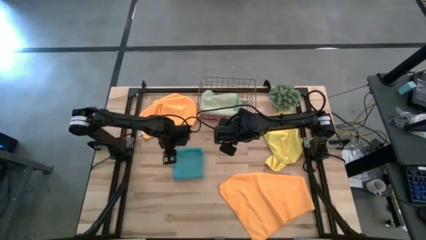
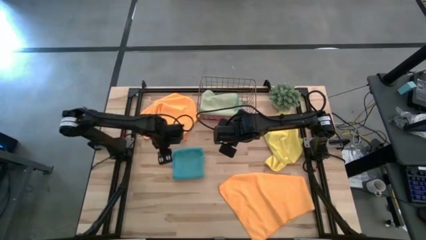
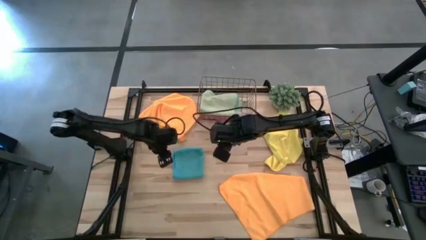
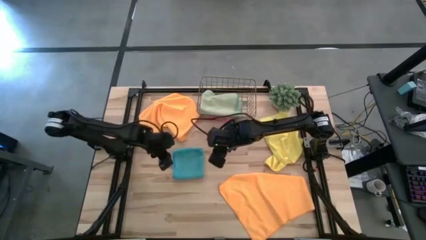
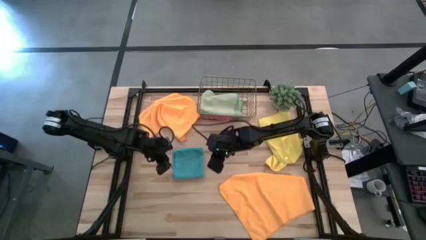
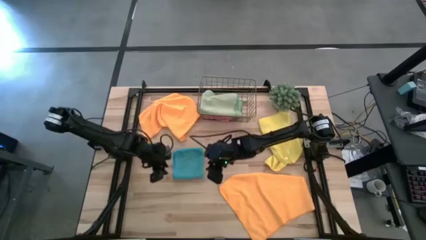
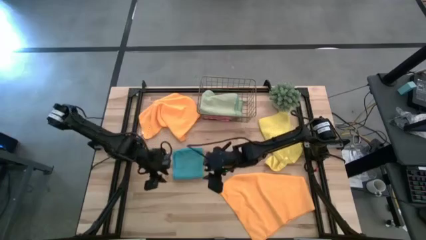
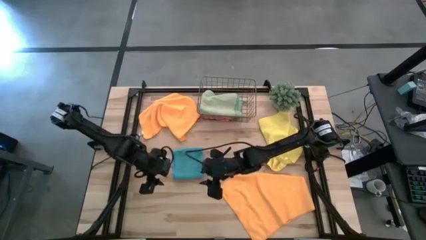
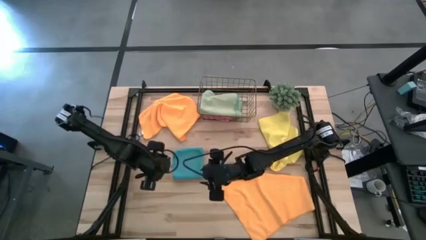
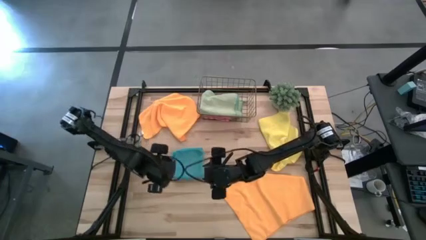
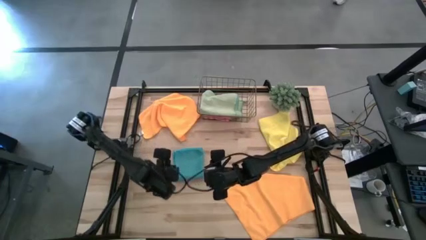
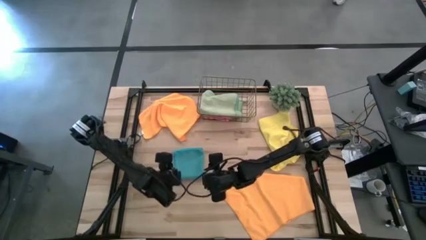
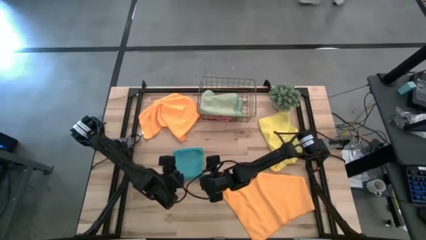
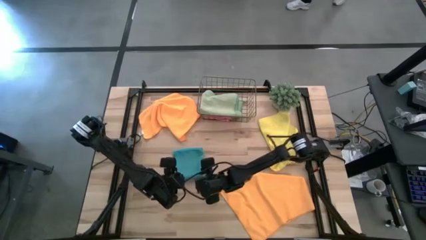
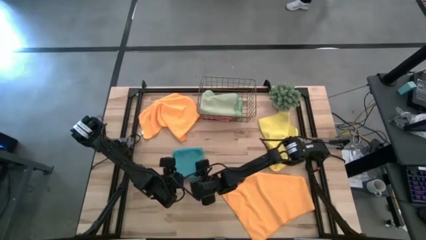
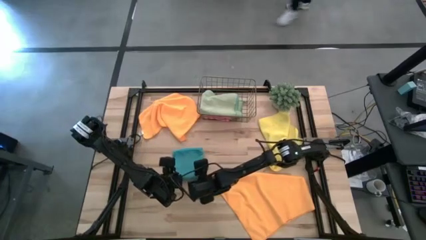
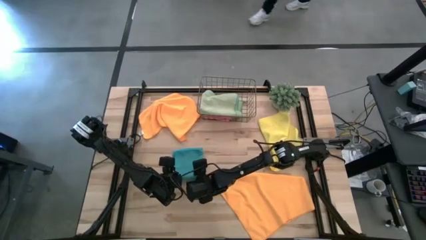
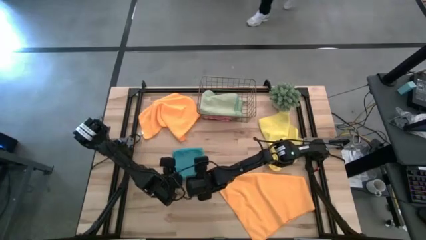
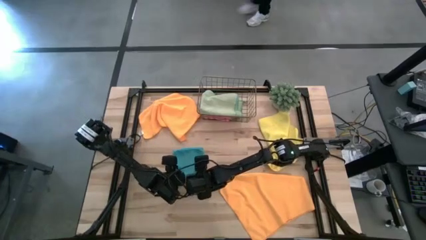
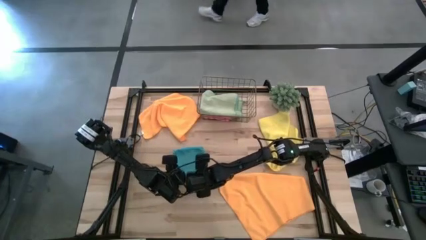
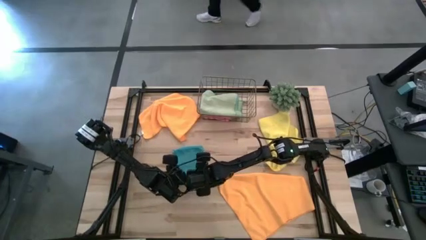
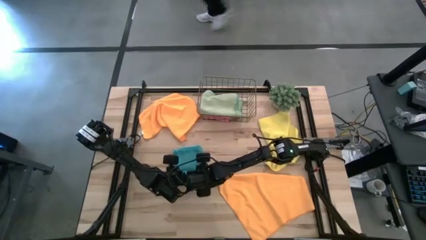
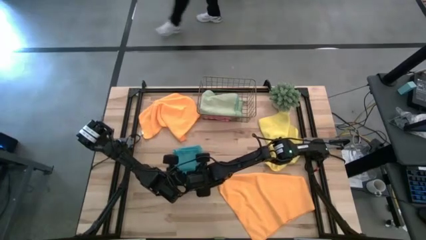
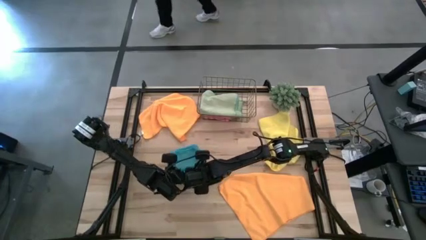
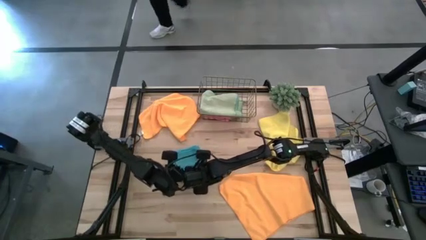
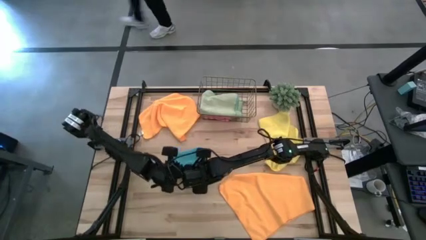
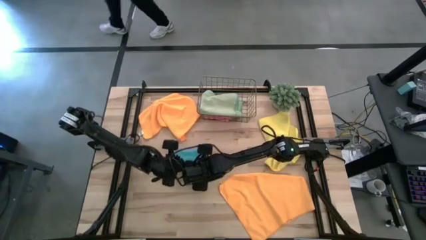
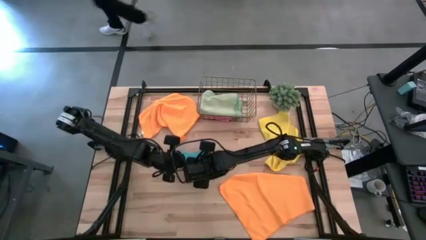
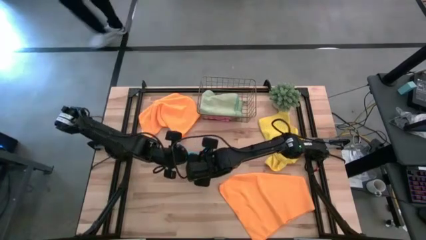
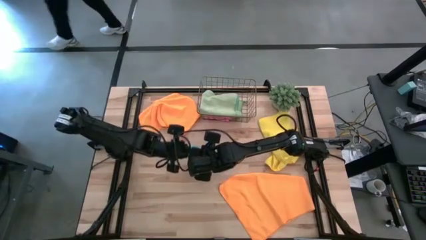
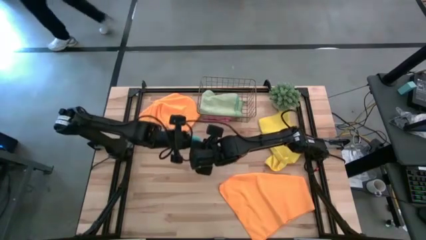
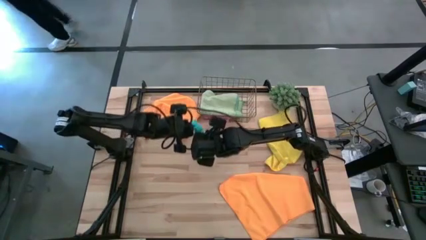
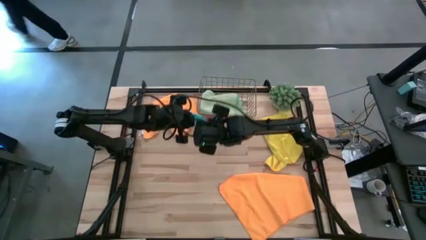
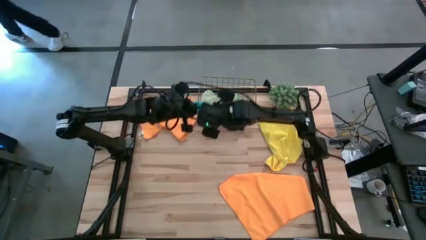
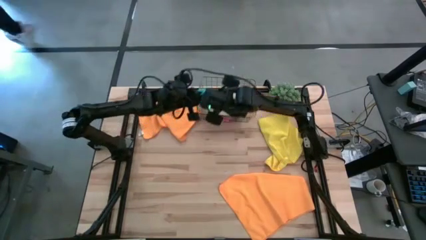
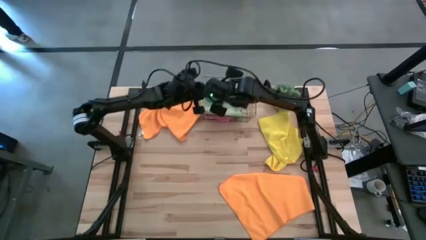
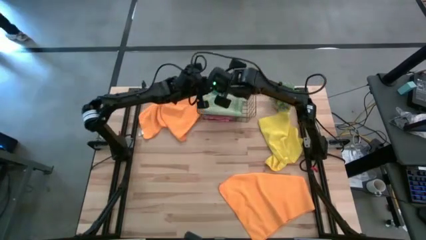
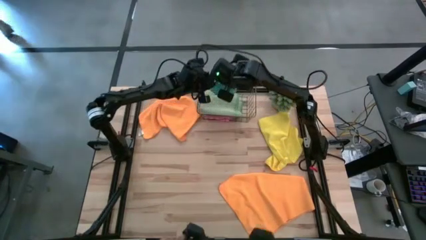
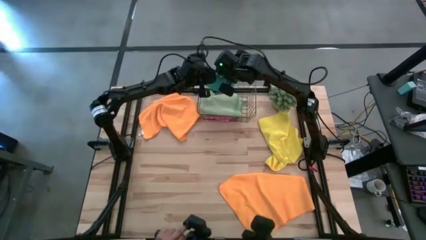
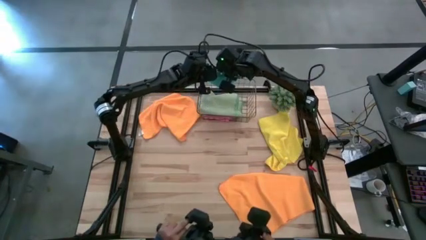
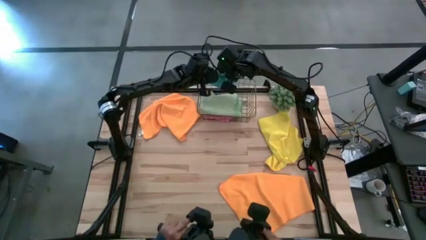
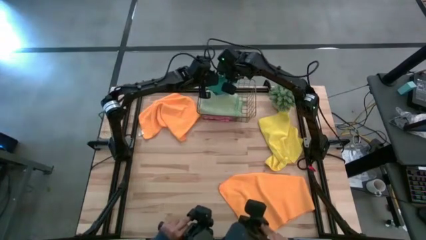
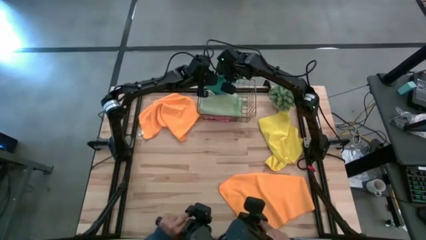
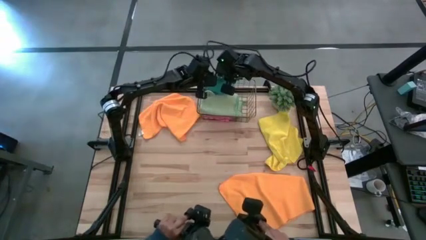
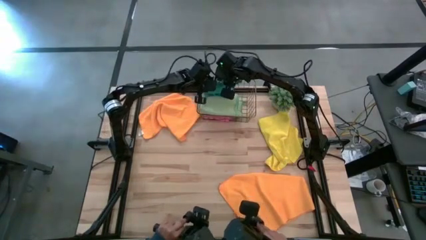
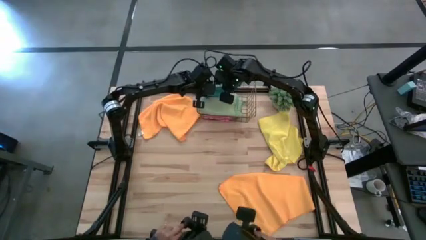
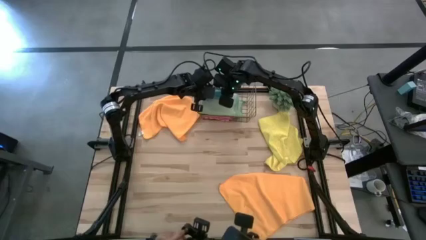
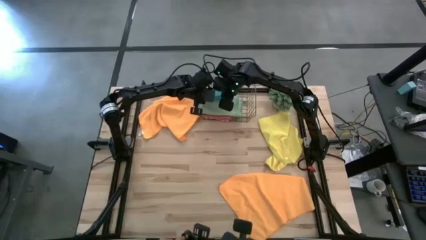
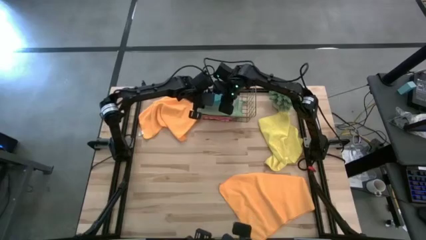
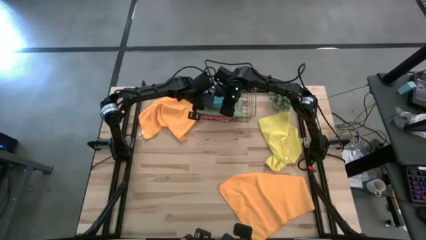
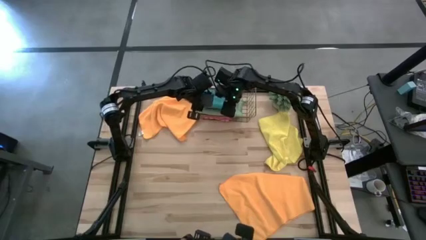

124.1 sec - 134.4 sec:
Task: Fold microfiber towels
Stack the folded blue microfiber cloth on top of the folded green microfiber cloth

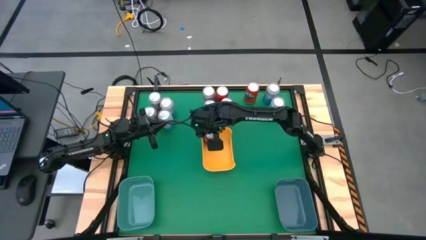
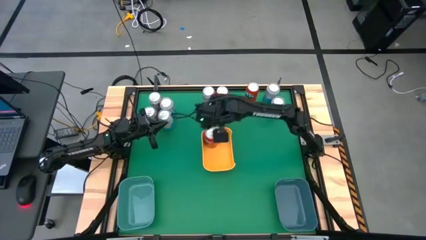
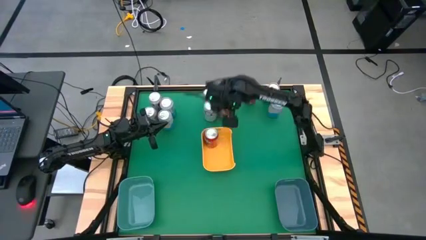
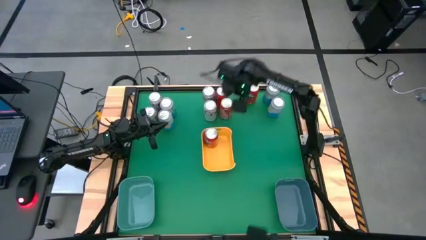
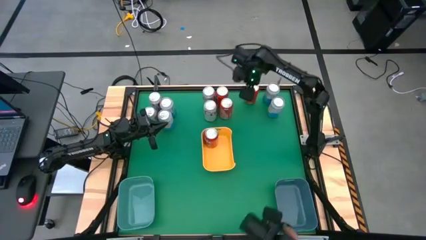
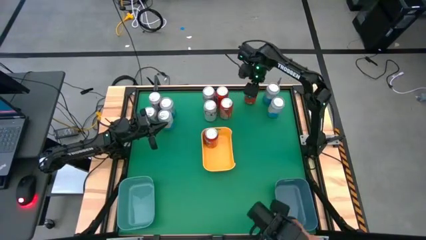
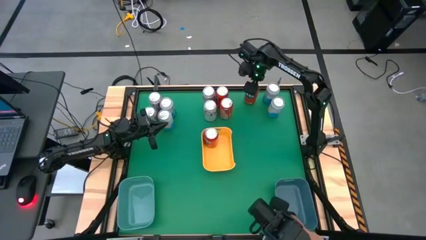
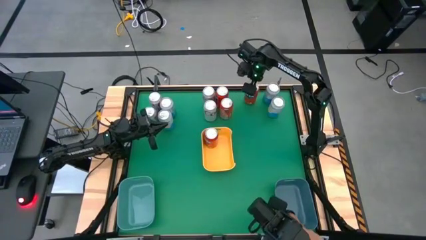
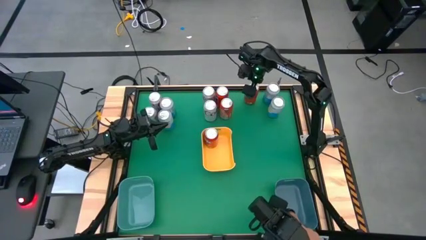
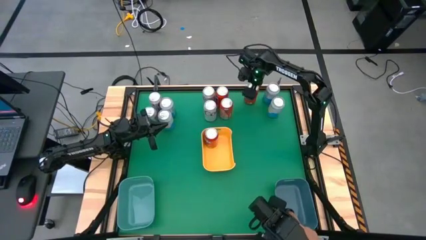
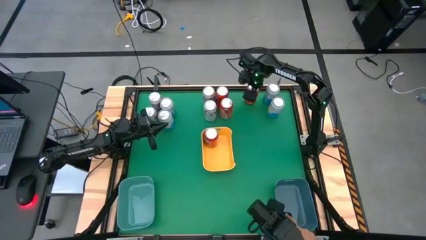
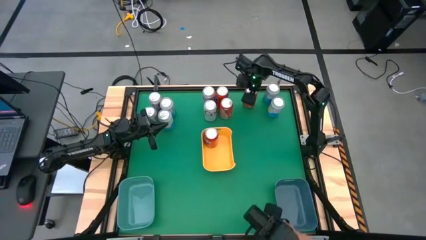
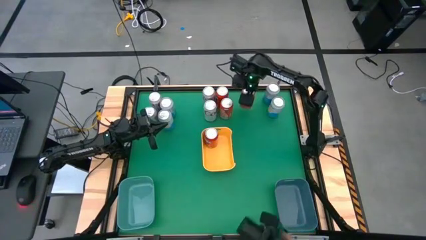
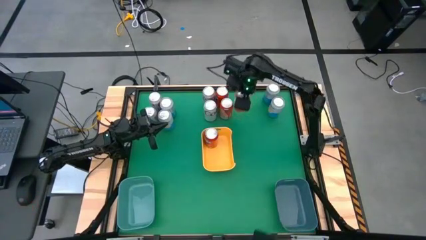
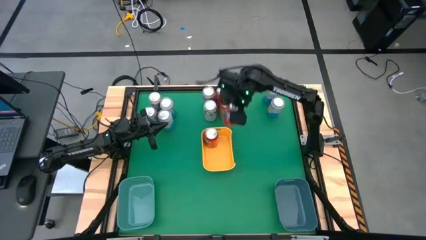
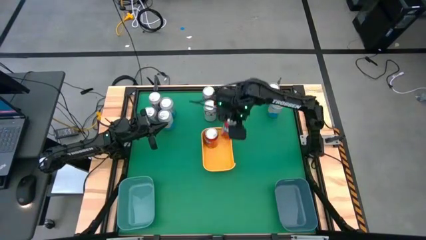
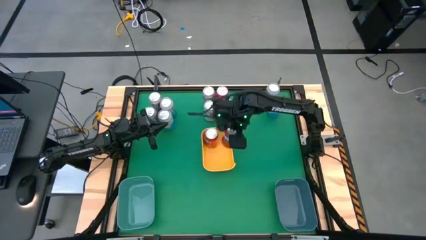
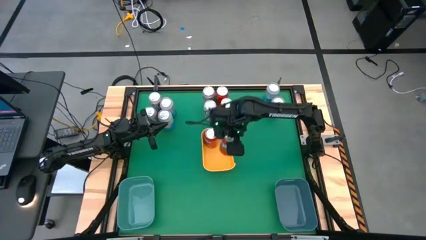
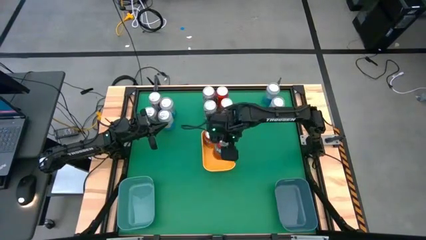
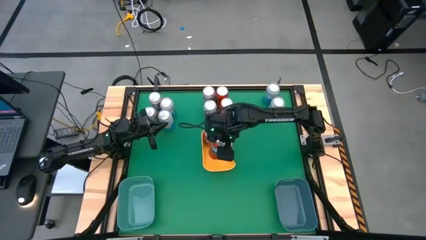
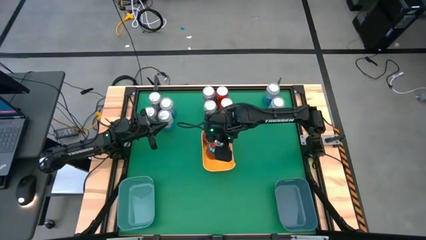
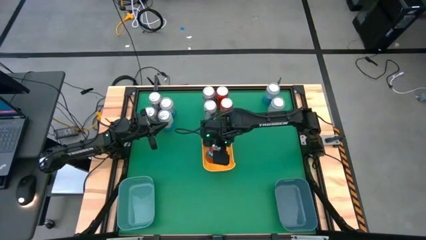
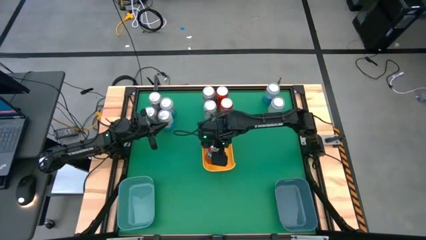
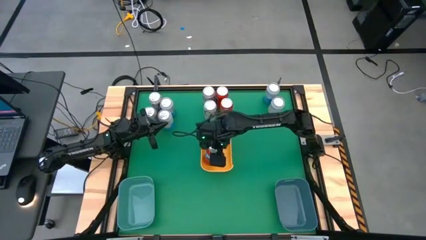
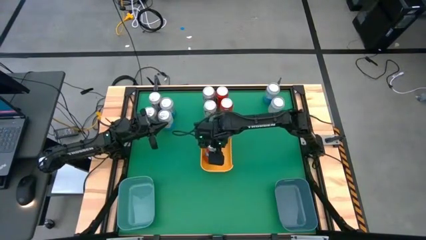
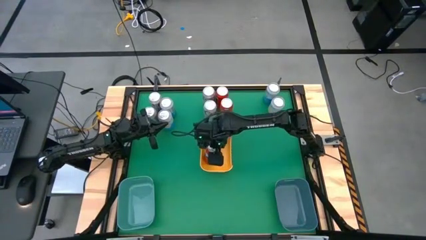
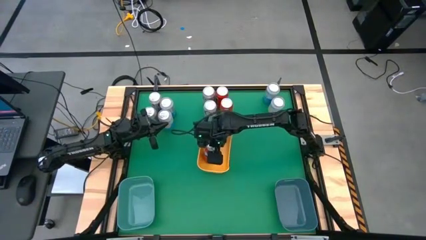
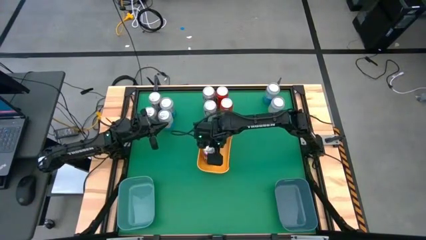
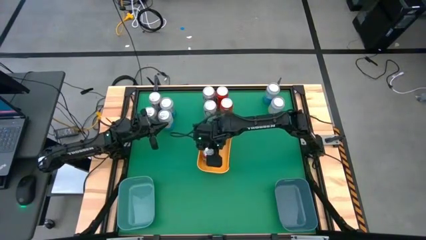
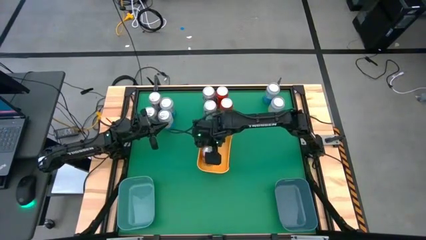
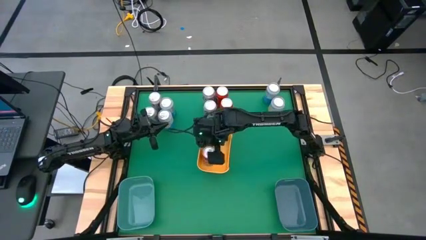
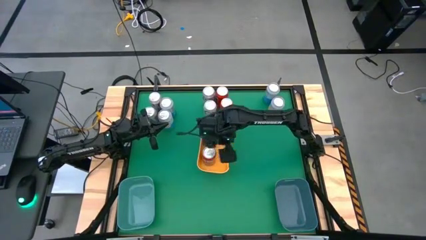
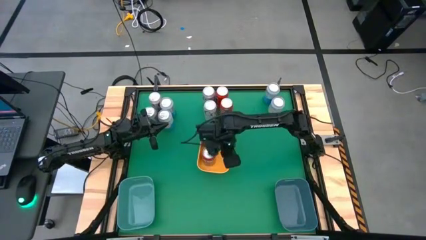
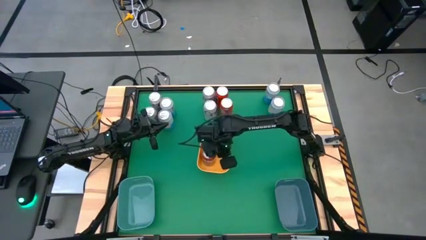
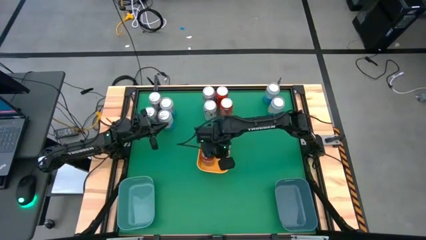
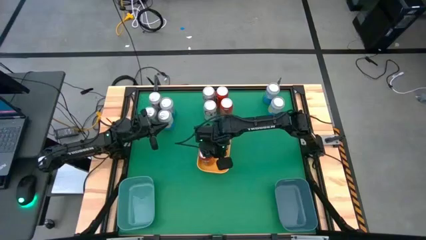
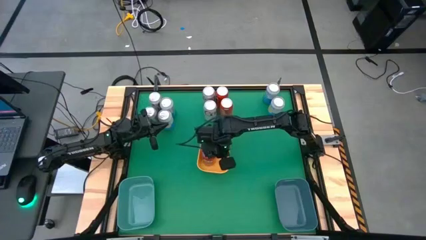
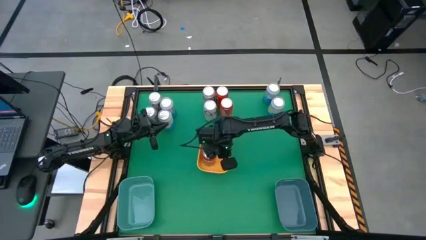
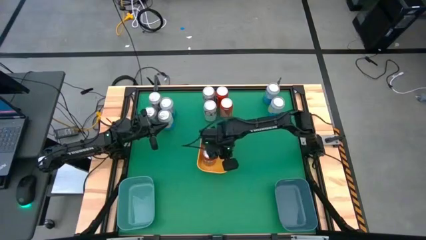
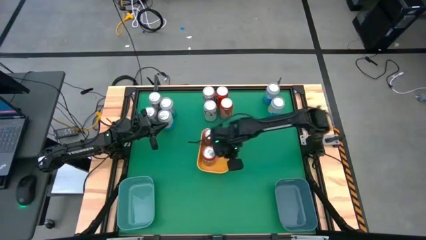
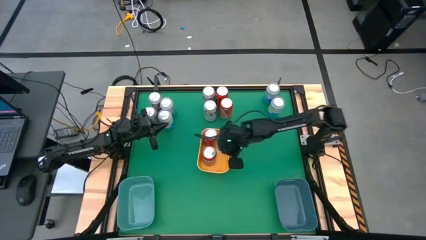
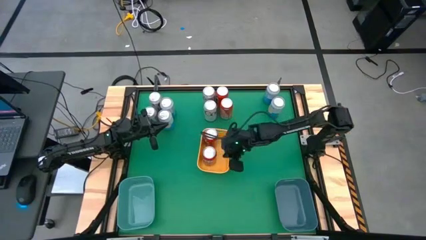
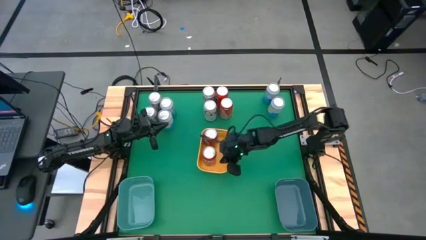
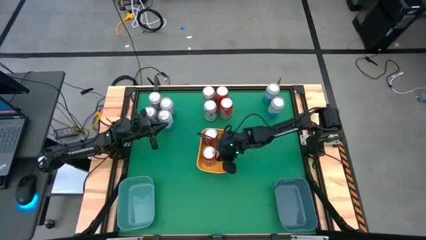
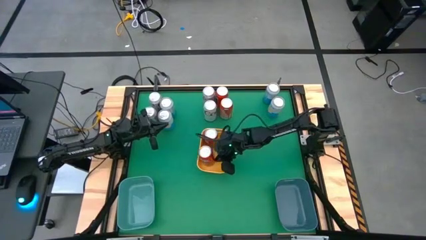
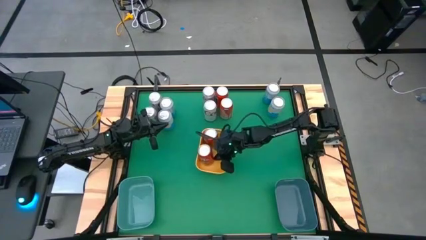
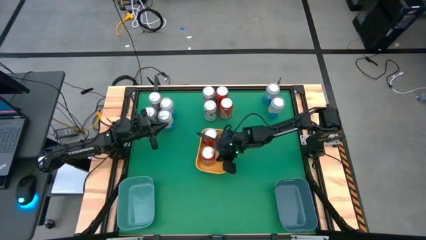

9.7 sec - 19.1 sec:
Task: Sort soda cans
Put the top right orange soda can into the yellow bin
